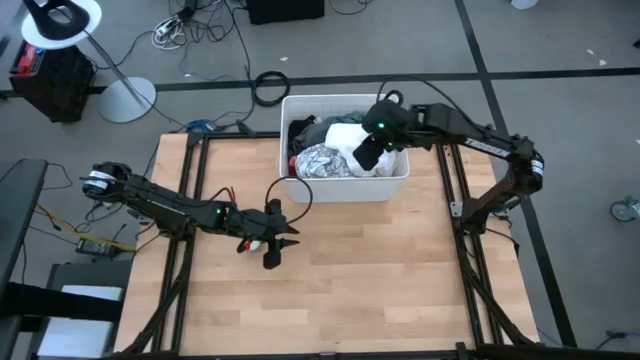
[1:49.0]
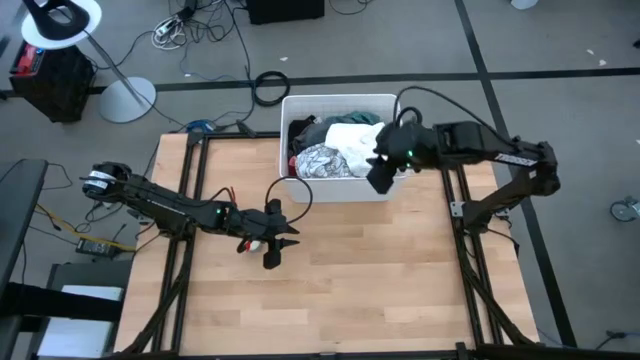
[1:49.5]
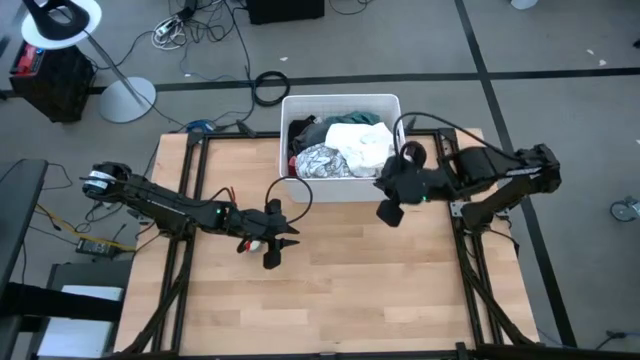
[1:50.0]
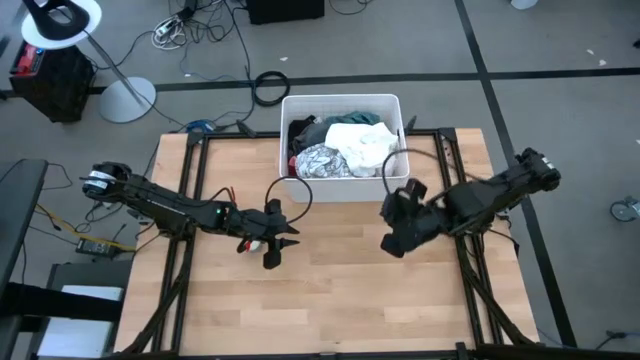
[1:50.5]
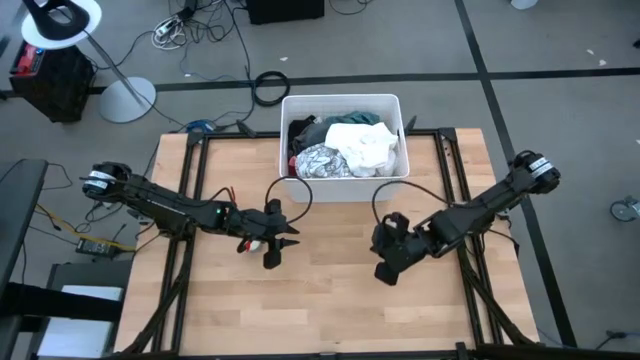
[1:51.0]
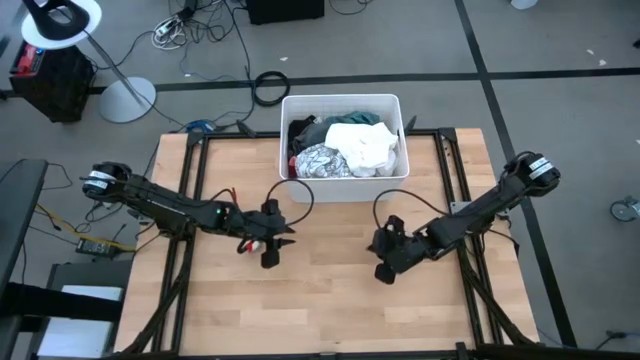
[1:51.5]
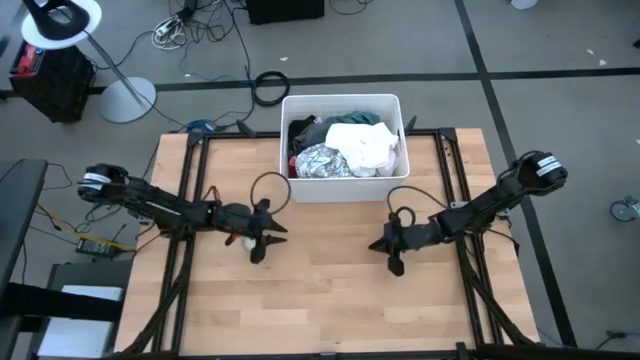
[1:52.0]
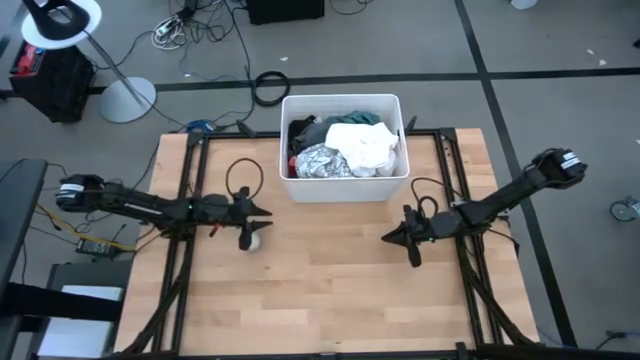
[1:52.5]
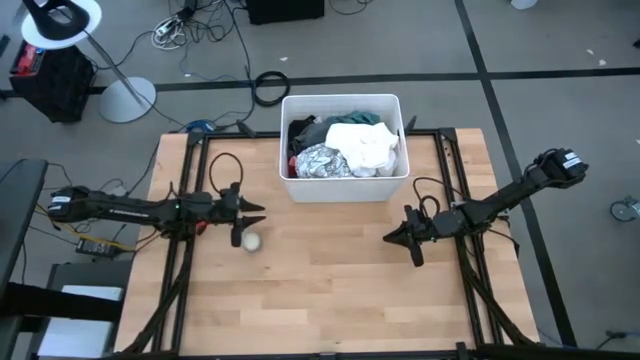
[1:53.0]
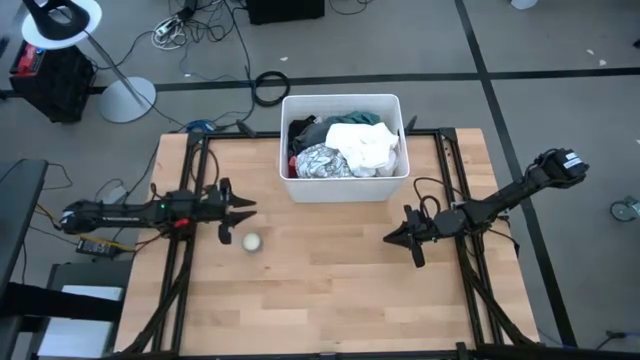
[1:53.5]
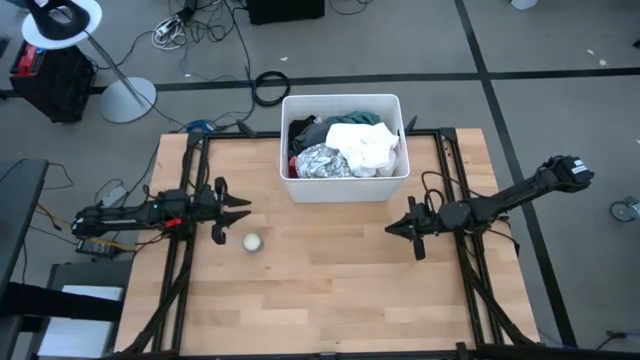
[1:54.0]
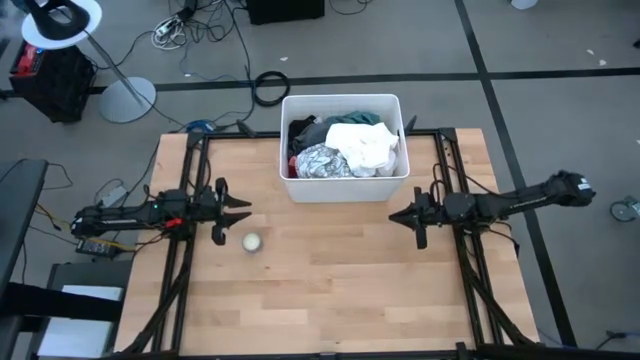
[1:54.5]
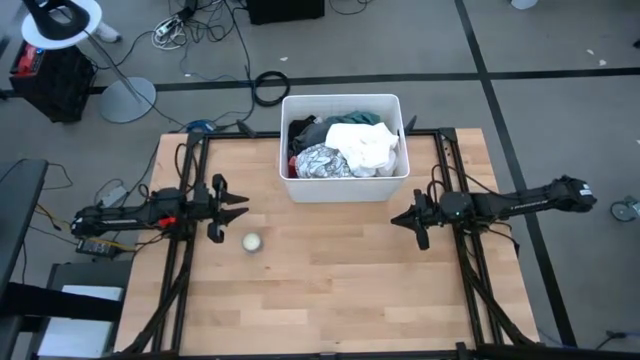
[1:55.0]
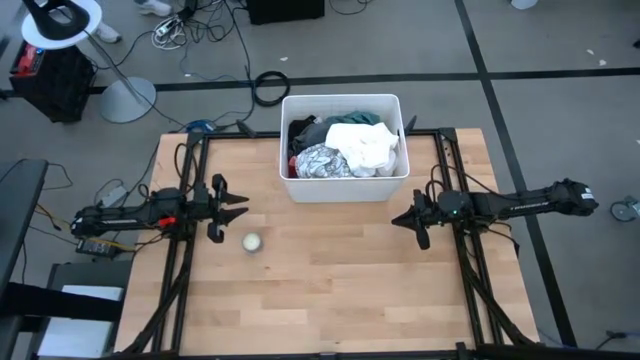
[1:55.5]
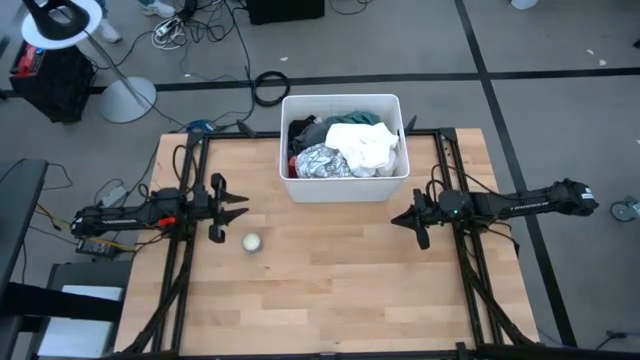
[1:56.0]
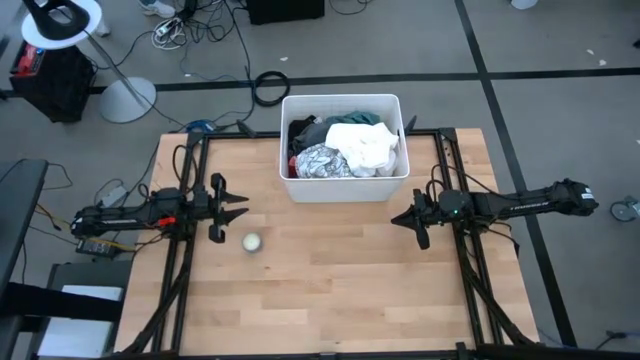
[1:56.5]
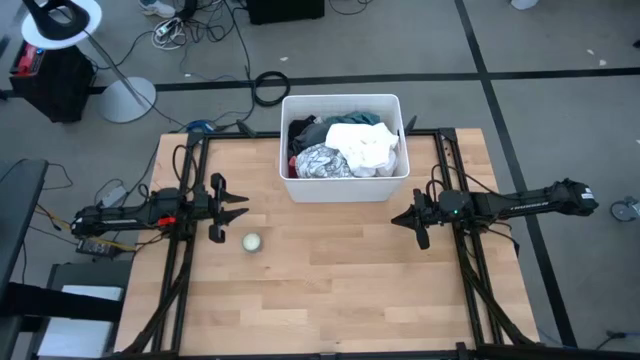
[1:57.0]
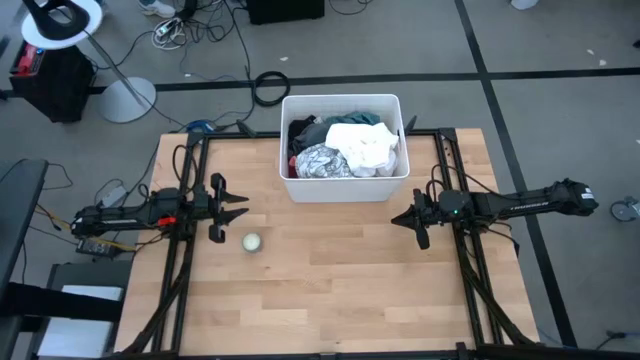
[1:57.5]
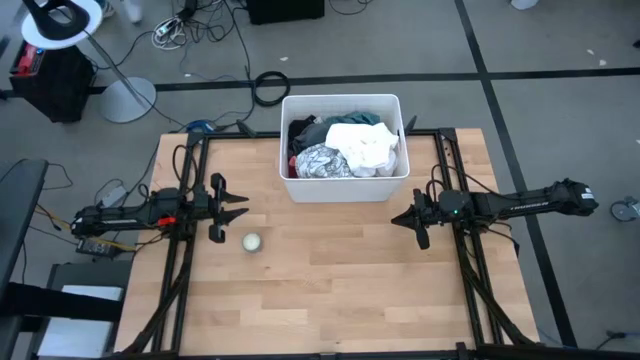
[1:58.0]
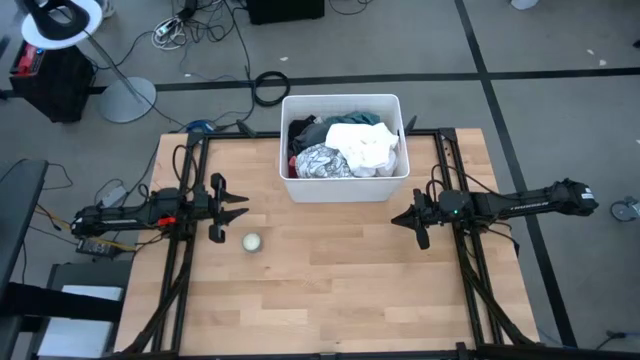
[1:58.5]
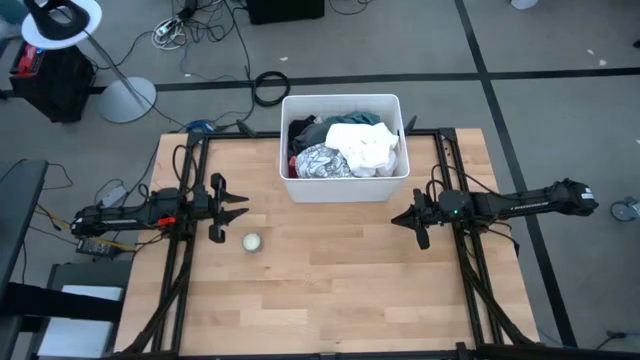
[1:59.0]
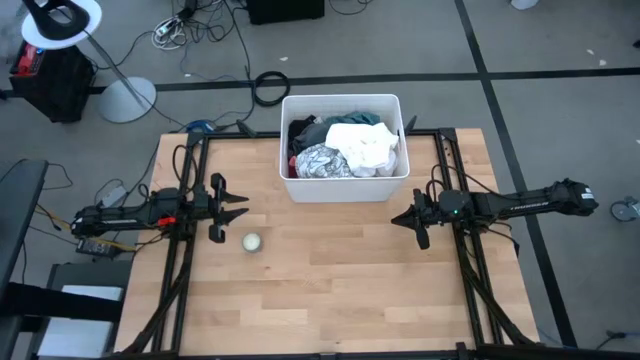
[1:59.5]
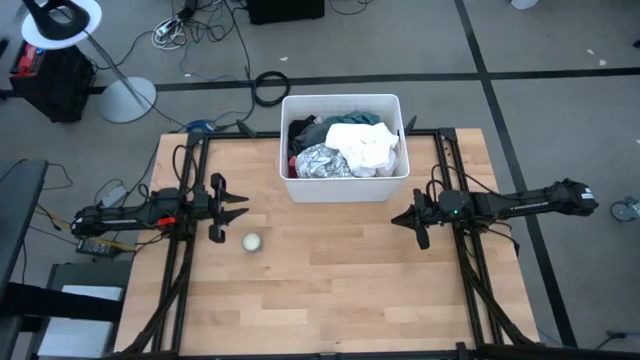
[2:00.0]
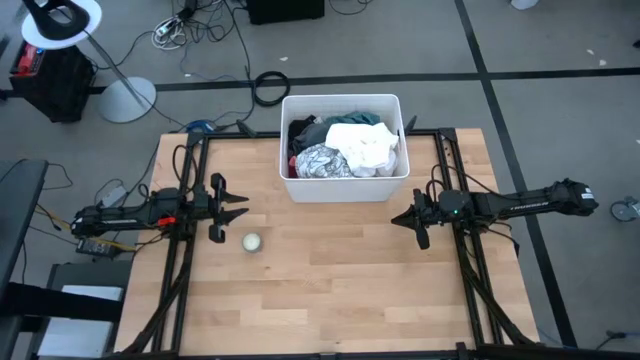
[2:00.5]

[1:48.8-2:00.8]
Task: Sort clothes
Return to Home Position

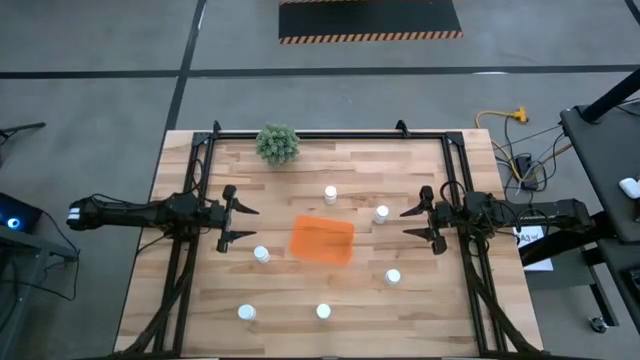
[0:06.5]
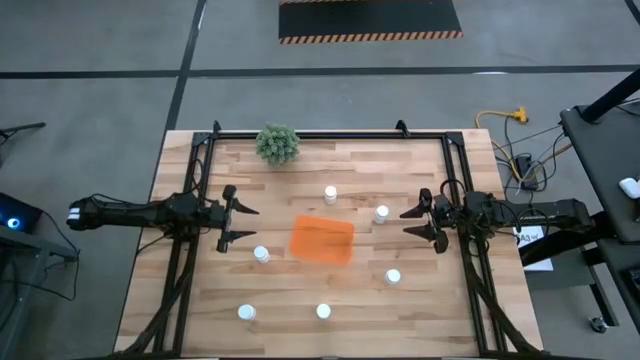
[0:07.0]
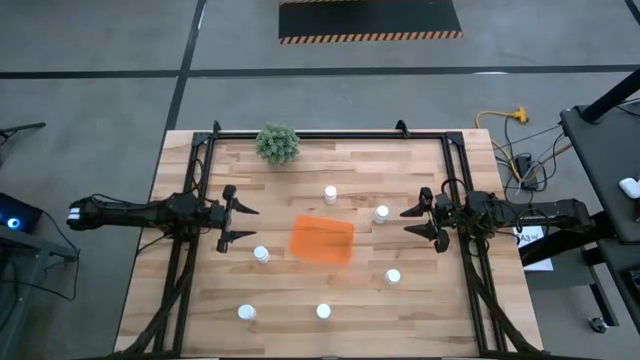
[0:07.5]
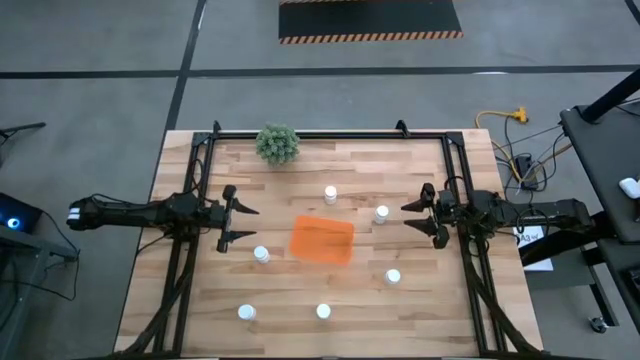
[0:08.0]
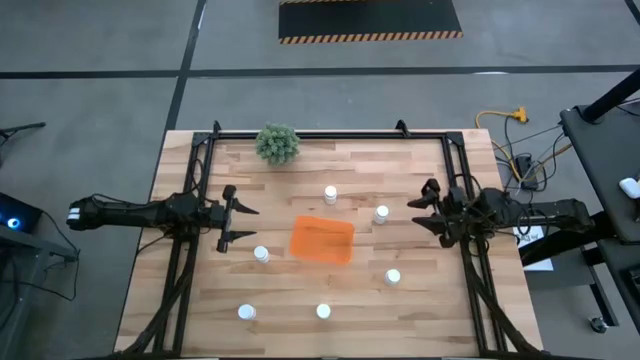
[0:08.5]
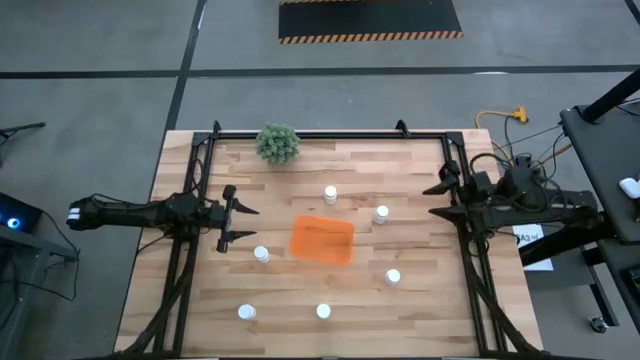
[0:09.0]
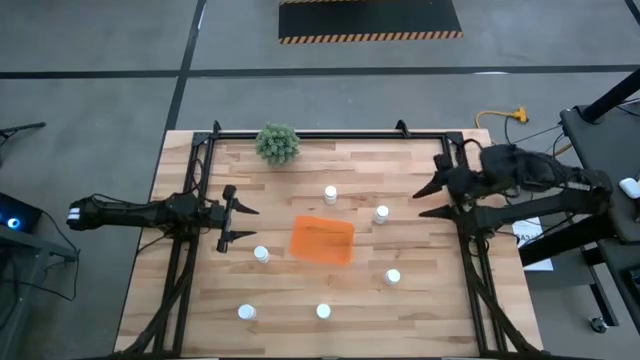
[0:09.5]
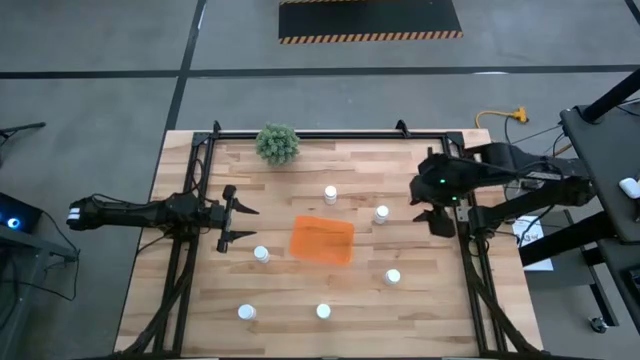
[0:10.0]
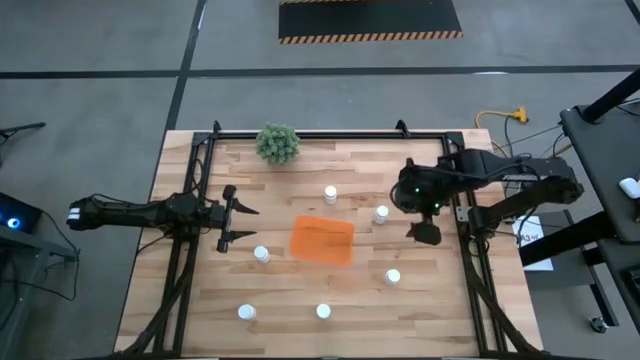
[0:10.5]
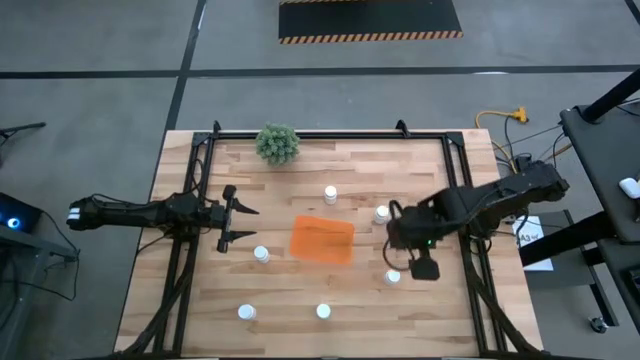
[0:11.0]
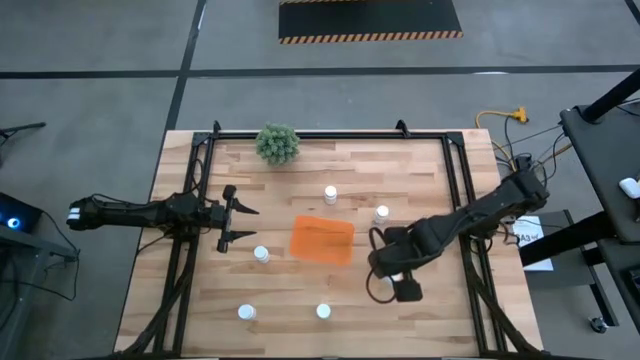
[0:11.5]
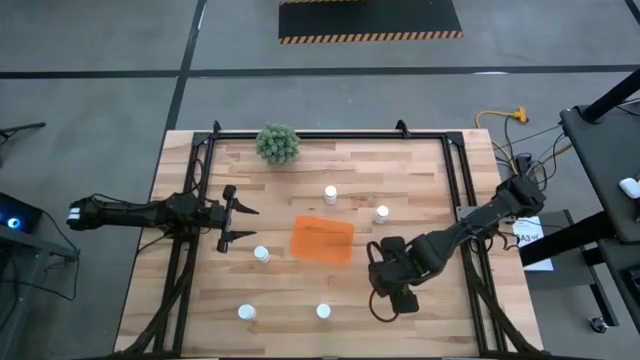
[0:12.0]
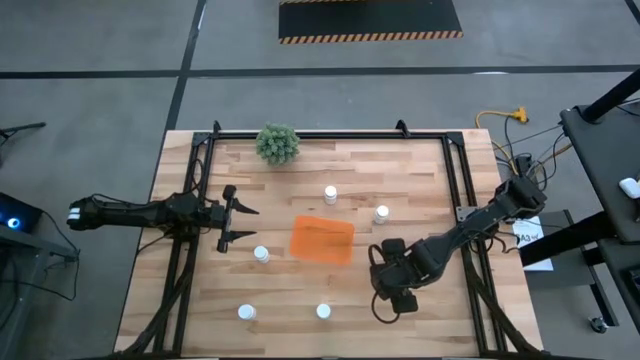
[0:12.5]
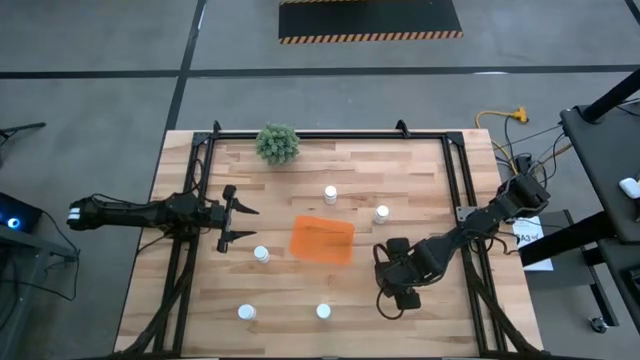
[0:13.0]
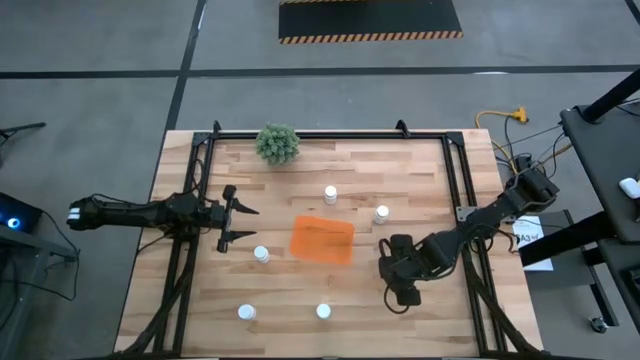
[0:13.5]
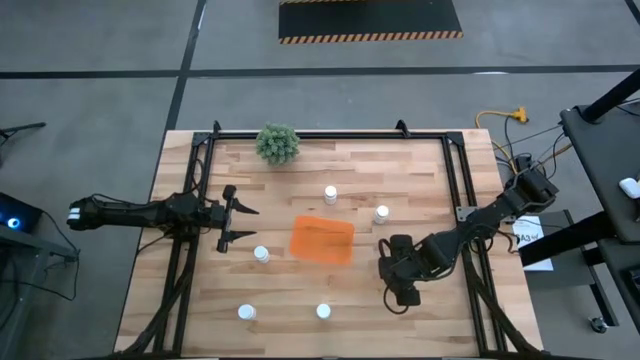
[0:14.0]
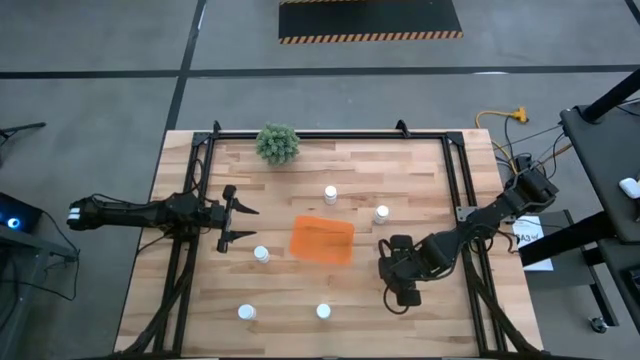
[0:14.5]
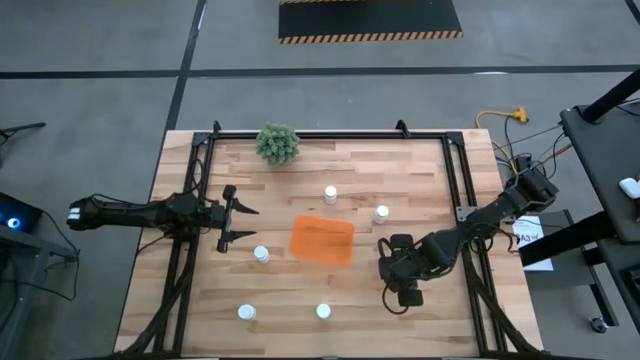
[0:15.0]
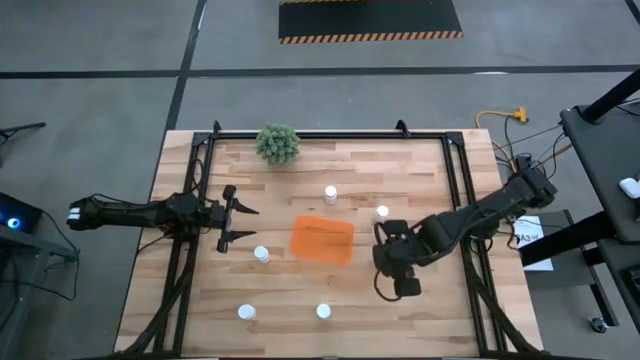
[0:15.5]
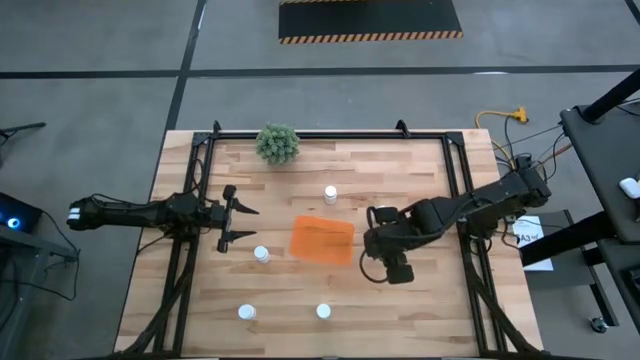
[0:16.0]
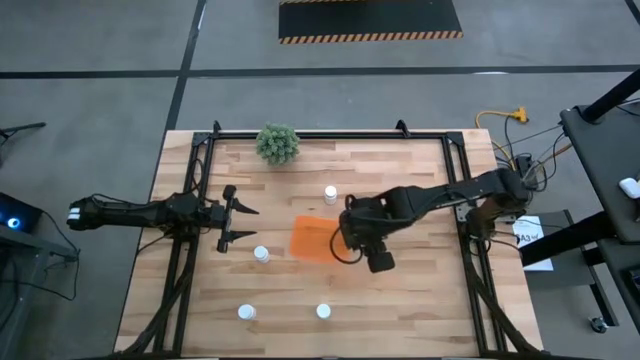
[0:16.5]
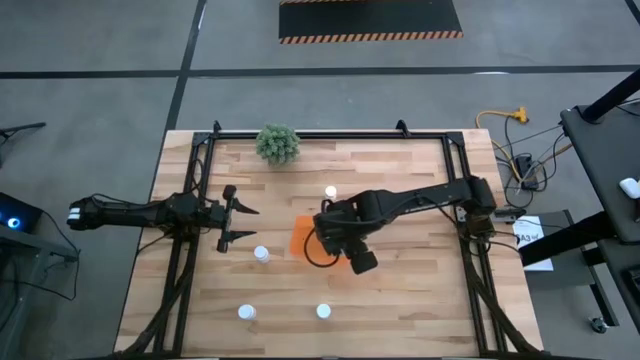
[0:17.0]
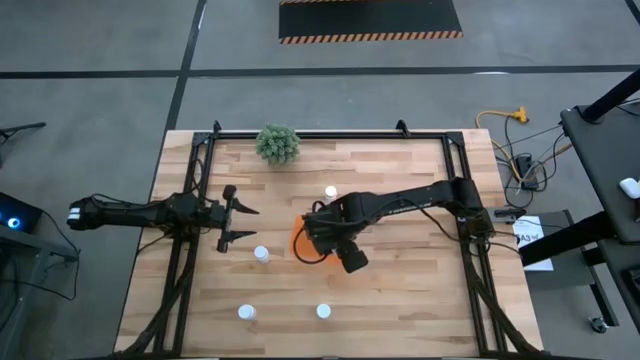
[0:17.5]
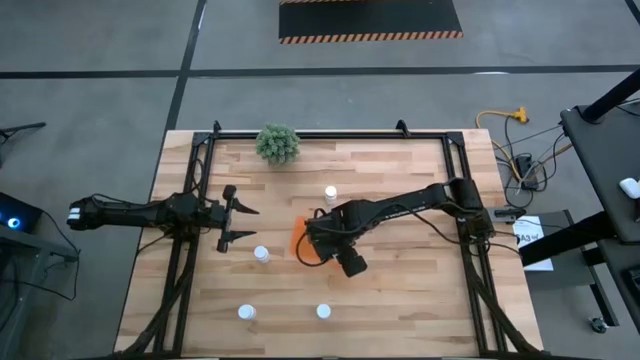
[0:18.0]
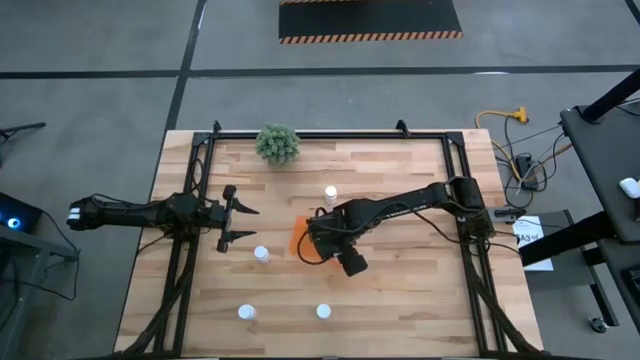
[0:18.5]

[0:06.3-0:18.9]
Task: Pick and place pill bottles into a basket
Put the pill bottle into the bin
